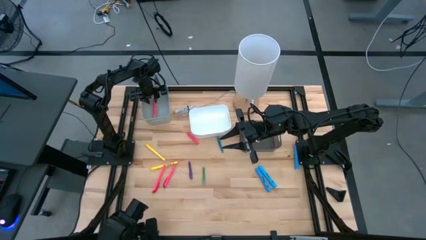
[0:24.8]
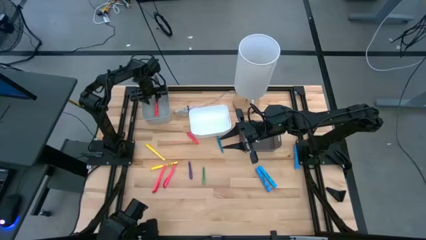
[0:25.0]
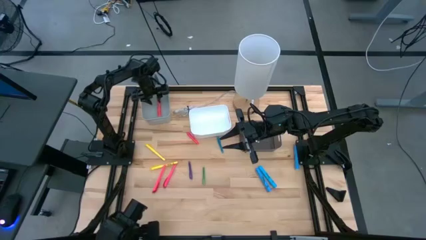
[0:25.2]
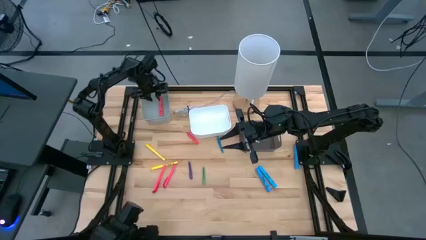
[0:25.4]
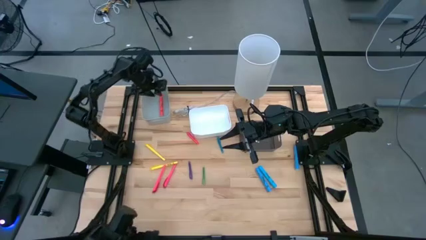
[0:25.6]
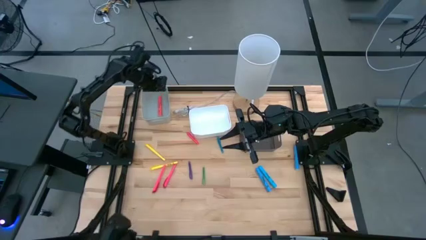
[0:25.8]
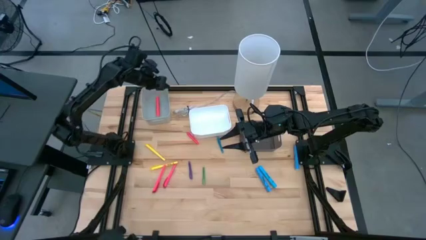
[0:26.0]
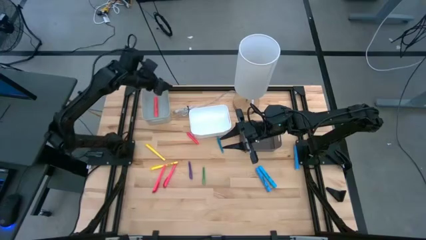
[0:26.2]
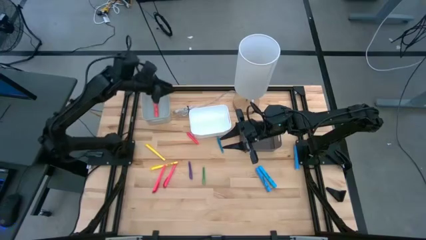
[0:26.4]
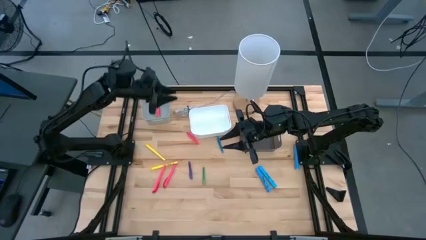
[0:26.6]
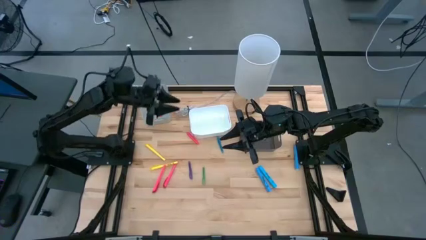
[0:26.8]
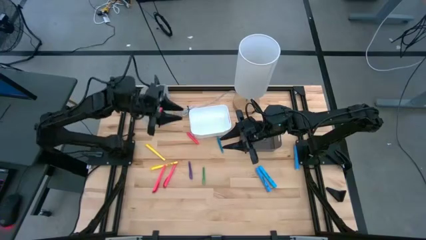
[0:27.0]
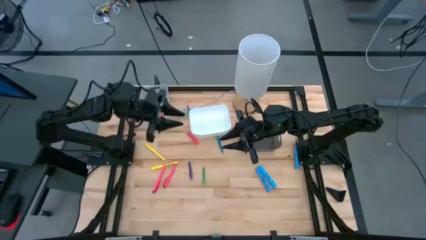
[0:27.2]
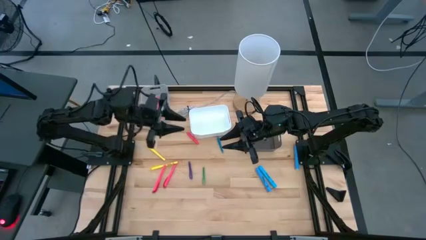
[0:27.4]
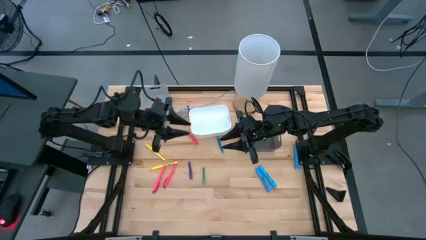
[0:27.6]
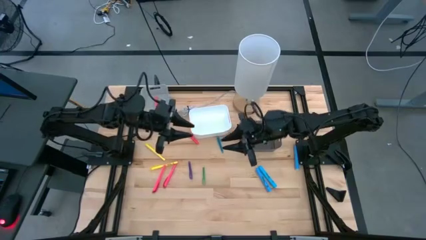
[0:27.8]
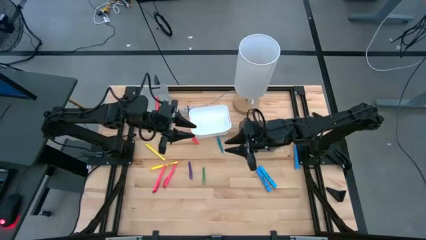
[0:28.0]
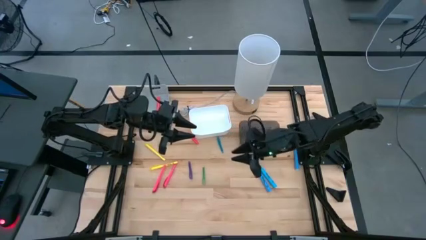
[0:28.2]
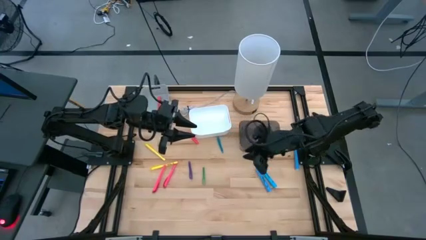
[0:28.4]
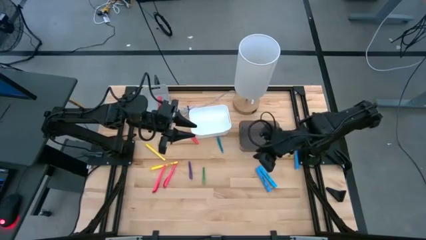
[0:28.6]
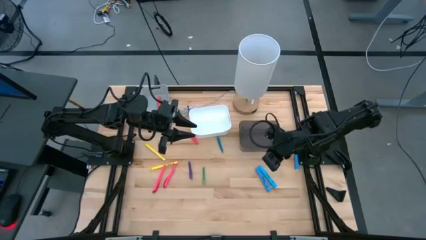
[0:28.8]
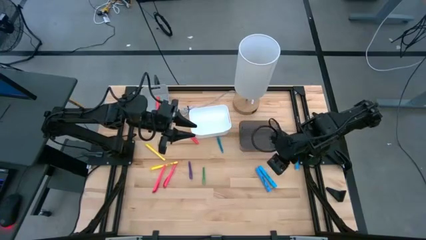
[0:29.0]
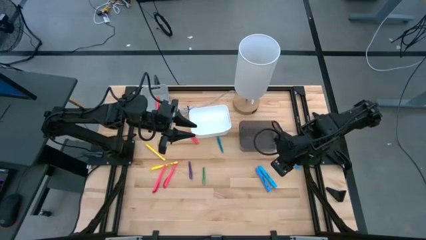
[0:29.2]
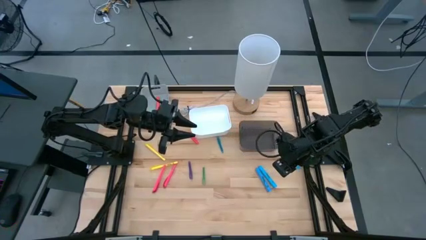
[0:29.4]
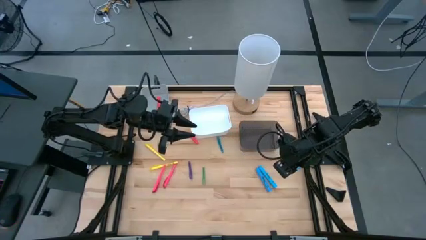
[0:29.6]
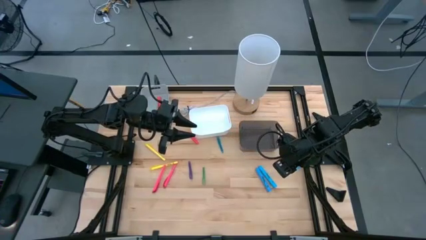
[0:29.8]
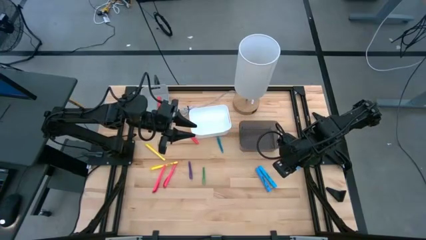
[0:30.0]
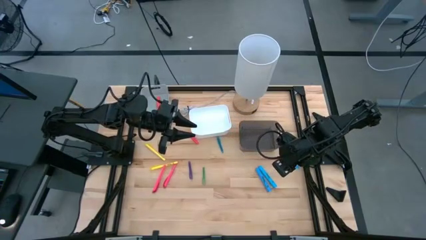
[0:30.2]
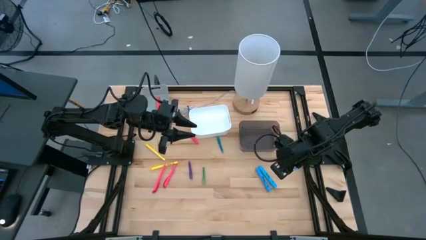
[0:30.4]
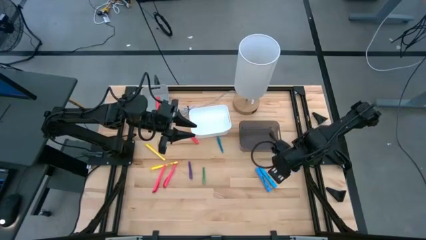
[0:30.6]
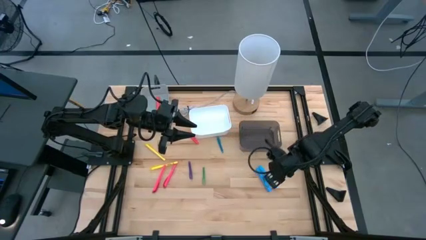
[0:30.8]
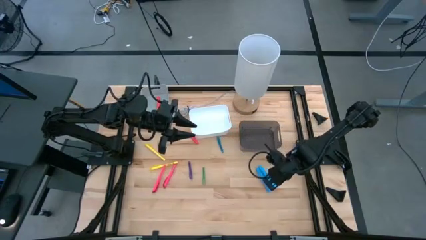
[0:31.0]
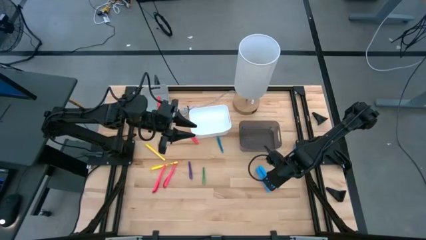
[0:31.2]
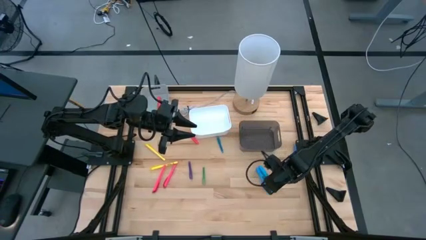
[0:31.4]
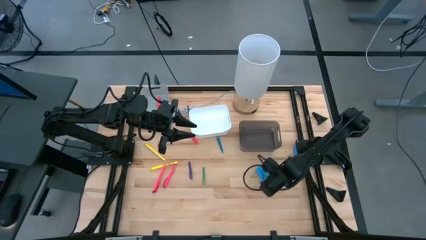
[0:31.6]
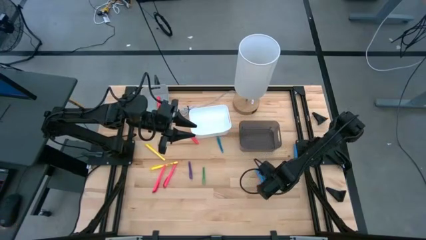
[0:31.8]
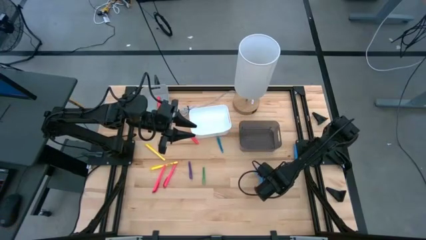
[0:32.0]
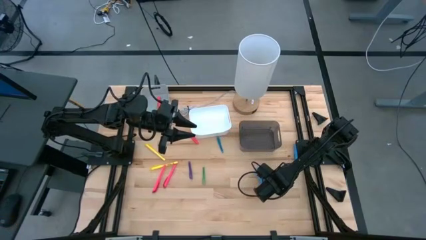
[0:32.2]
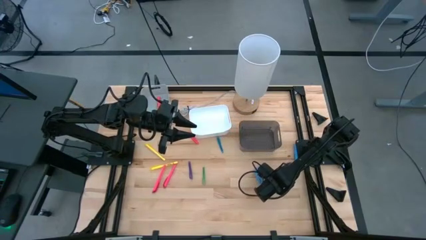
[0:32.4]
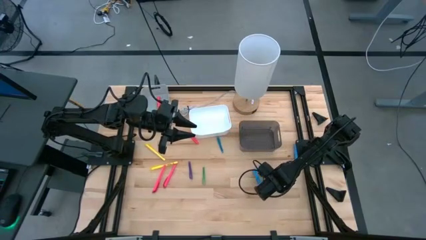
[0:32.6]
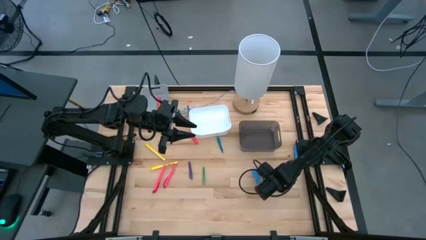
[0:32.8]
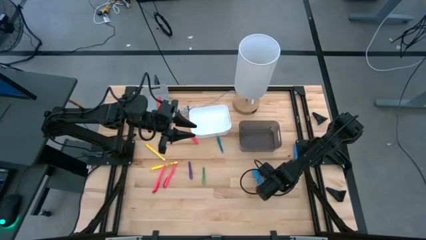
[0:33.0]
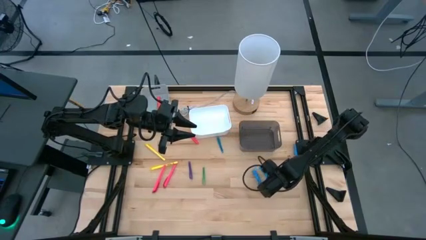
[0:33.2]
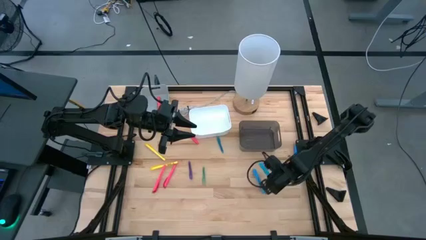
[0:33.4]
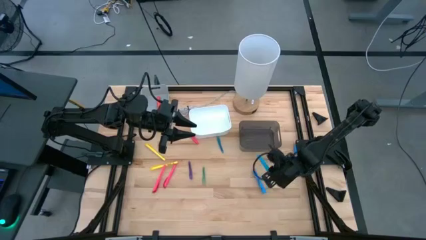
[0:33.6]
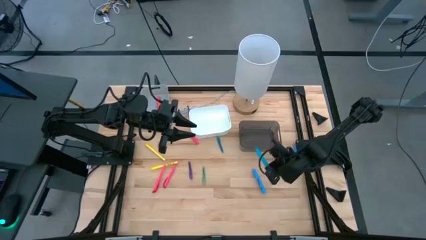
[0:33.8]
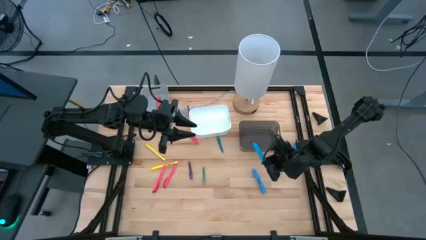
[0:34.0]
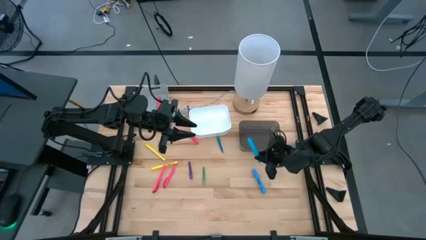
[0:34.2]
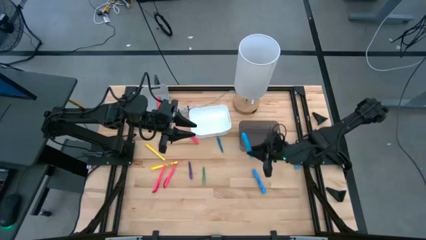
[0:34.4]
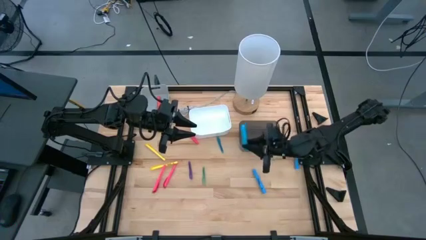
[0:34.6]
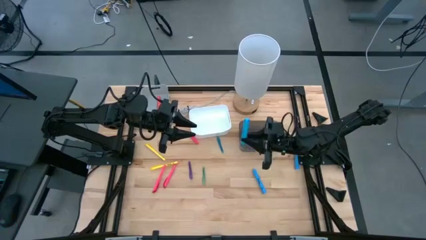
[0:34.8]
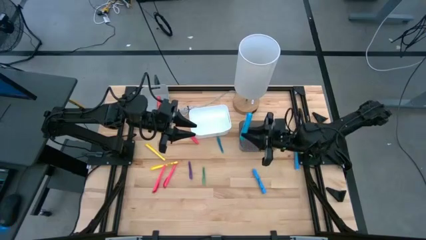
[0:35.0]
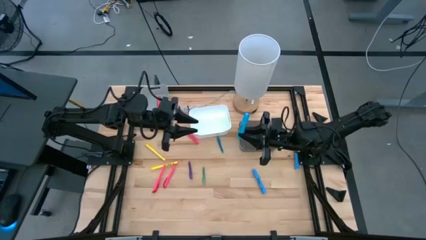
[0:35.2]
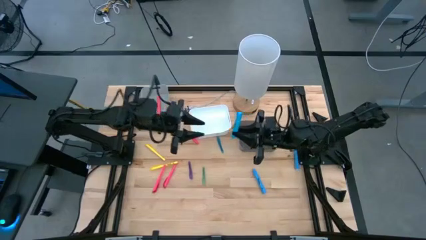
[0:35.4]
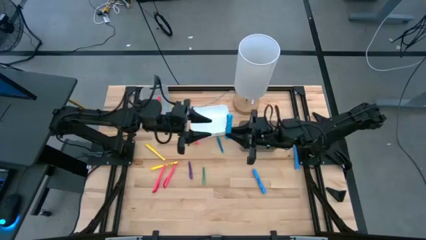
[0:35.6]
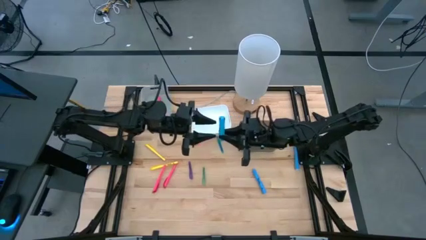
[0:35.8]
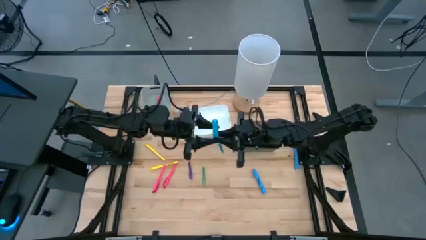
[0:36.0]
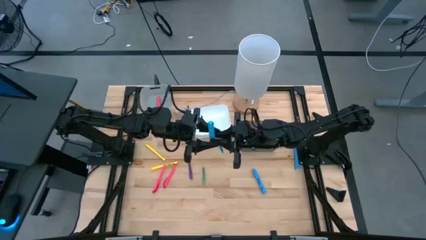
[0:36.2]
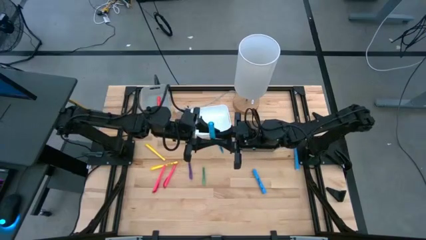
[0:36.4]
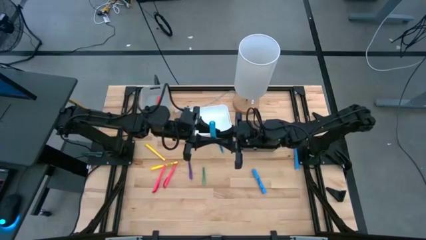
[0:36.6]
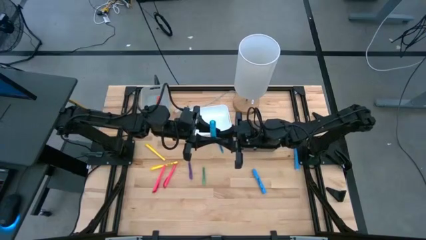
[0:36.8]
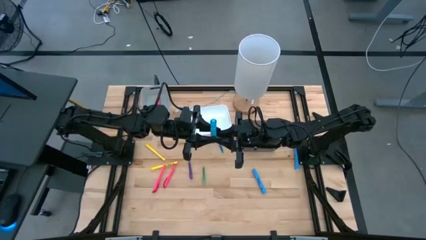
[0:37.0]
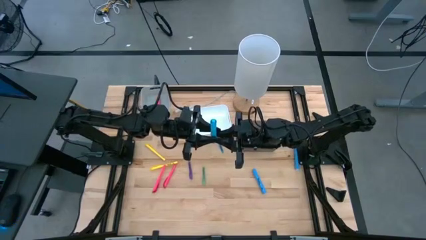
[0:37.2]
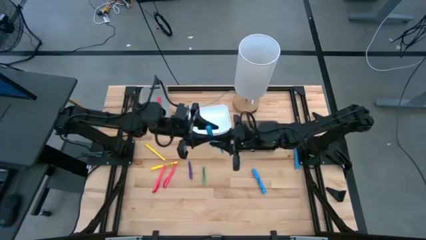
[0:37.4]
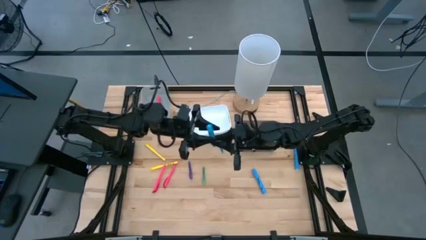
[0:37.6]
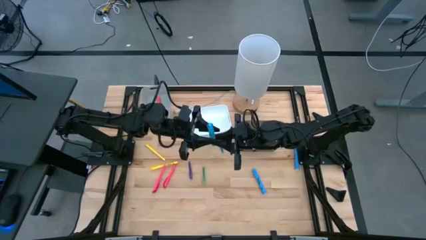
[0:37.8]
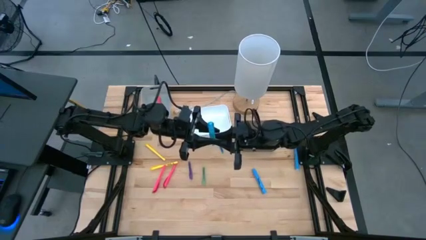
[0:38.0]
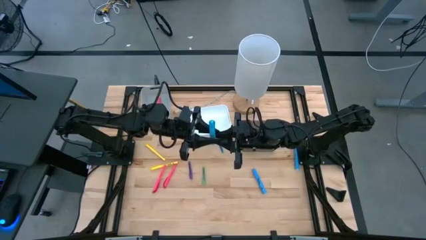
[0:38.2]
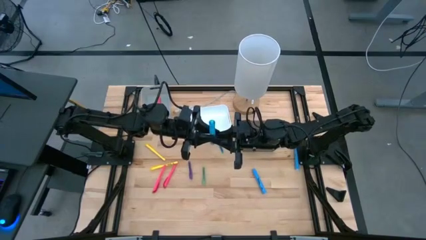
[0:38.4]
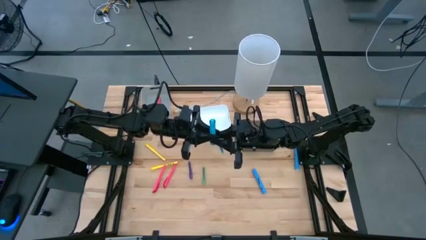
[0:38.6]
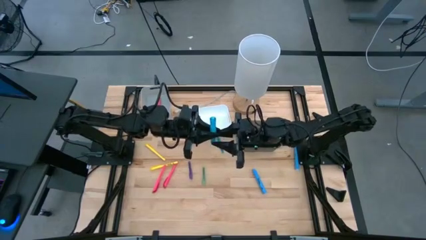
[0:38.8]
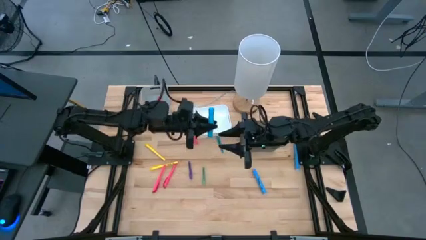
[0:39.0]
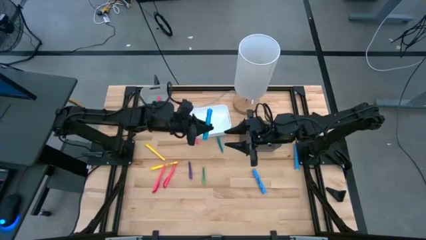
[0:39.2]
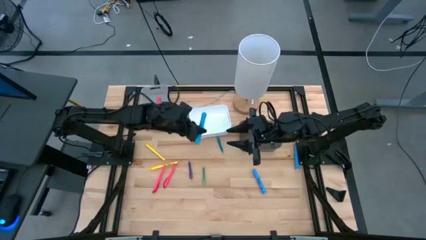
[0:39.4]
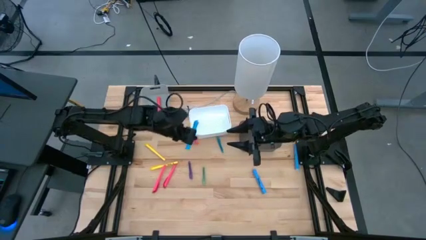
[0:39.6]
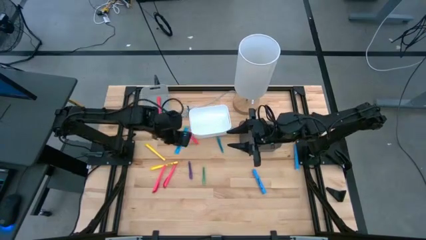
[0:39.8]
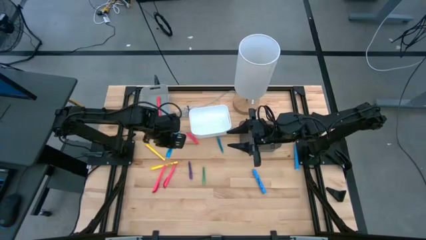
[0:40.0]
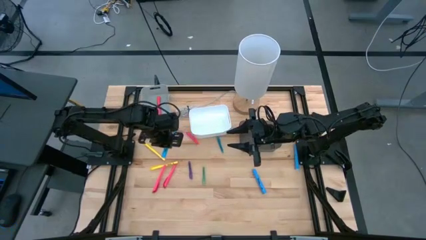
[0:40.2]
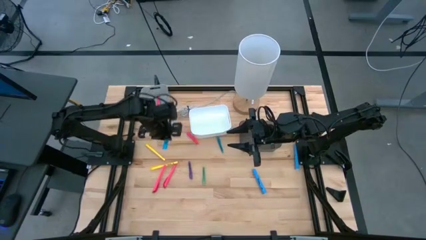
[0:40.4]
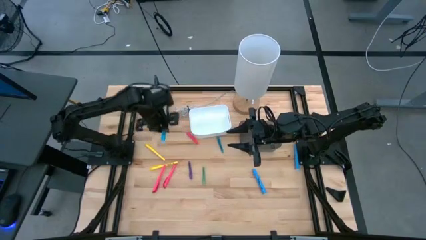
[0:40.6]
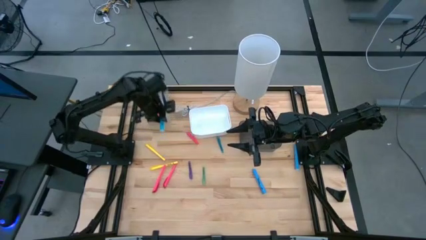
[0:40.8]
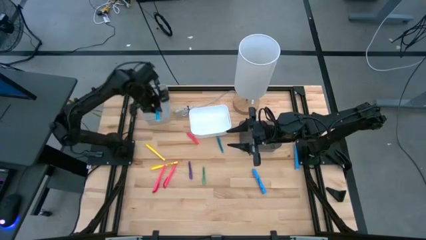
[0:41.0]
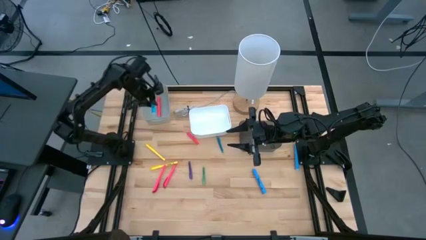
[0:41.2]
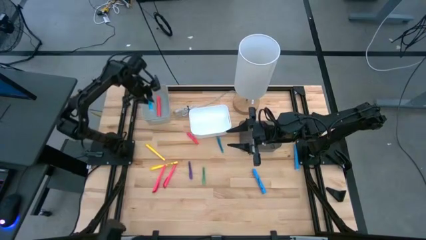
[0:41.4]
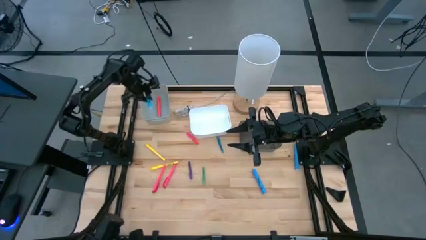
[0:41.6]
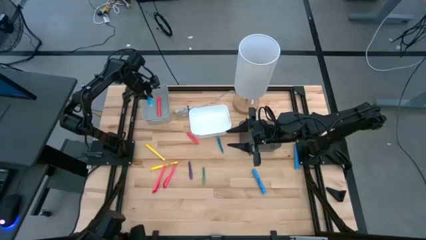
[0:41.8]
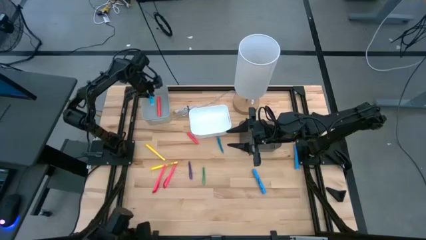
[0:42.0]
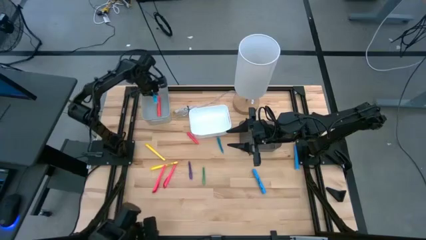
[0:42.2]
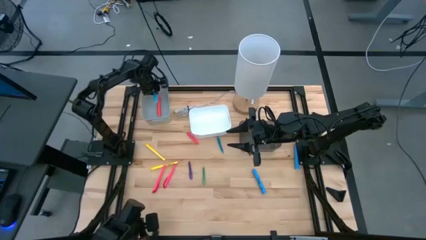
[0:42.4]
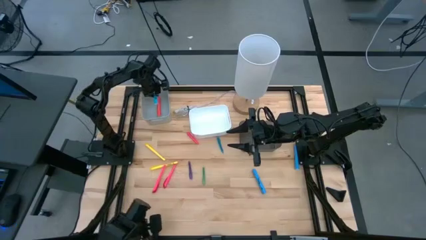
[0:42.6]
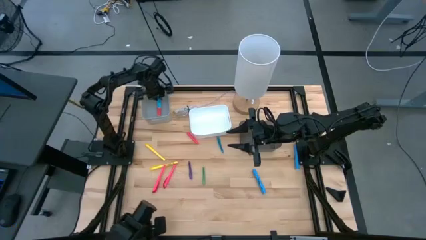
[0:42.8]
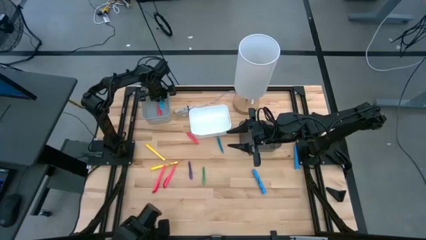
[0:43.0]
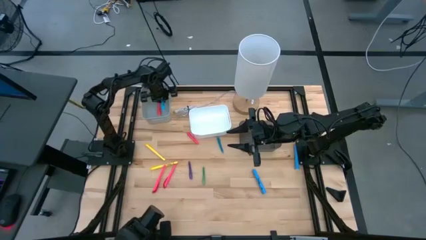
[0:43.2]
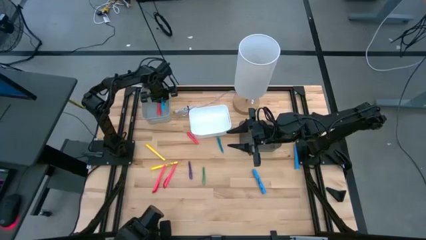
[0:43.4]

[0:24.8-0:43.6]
Task: Pick & Place Markers
Put the middle blue highlighter pen into the gray bin
